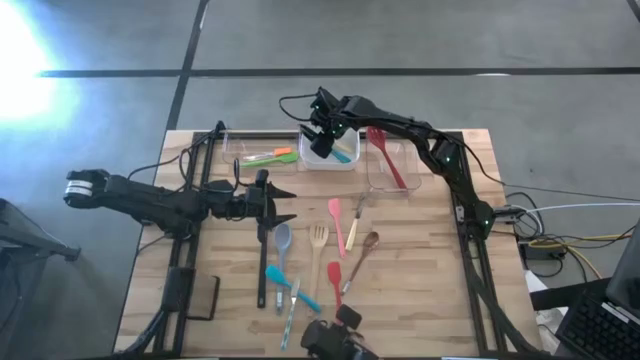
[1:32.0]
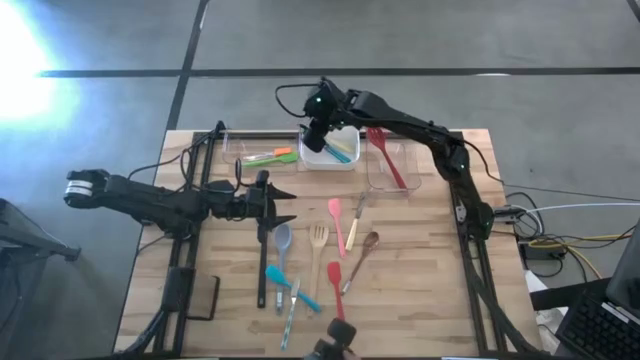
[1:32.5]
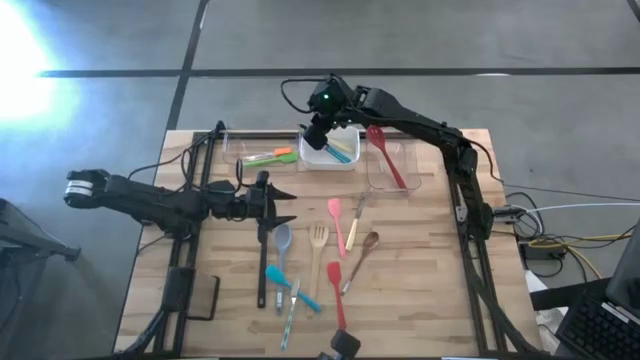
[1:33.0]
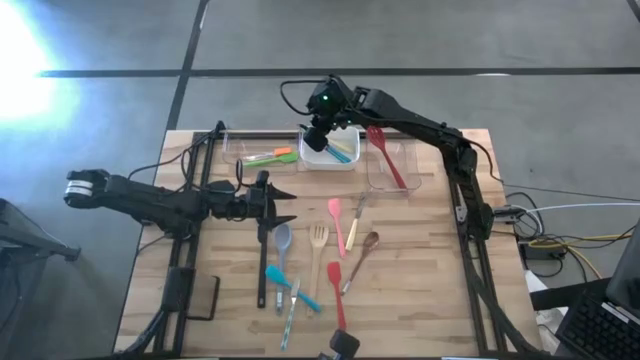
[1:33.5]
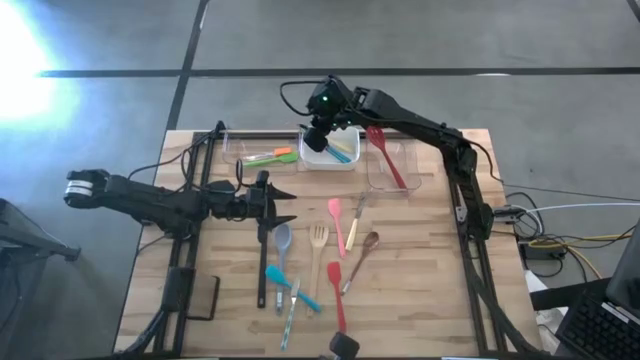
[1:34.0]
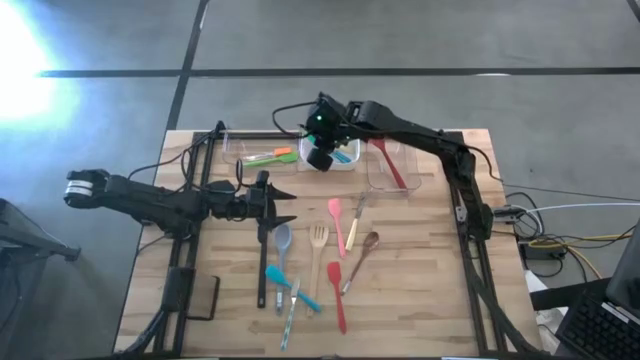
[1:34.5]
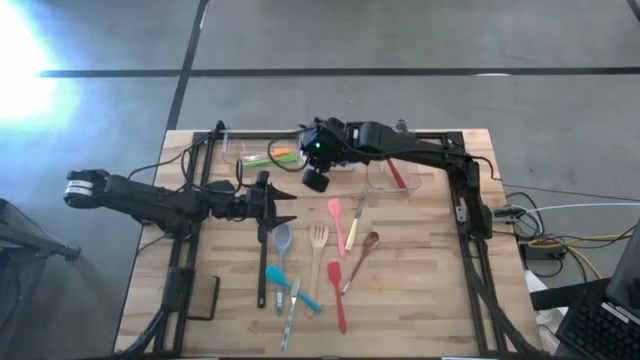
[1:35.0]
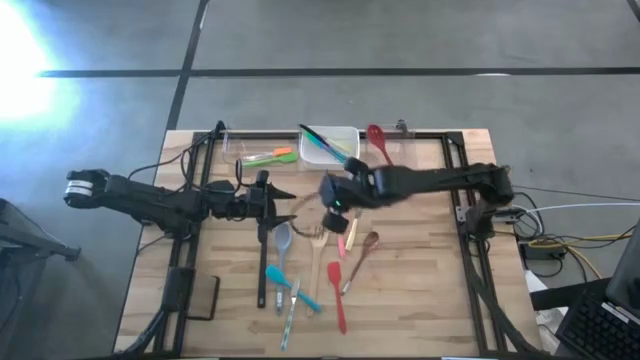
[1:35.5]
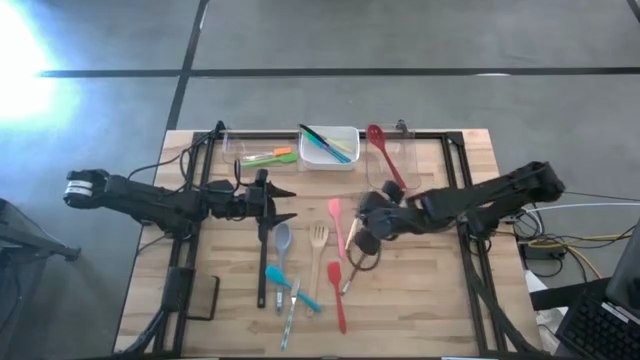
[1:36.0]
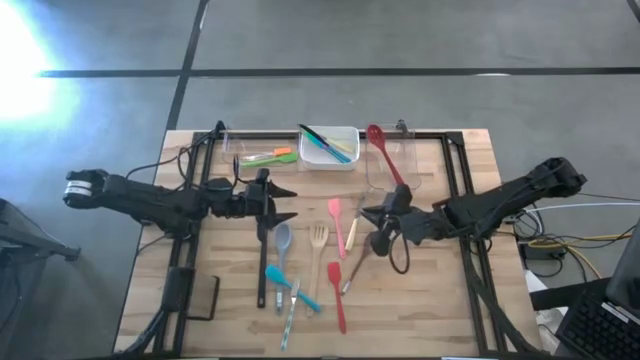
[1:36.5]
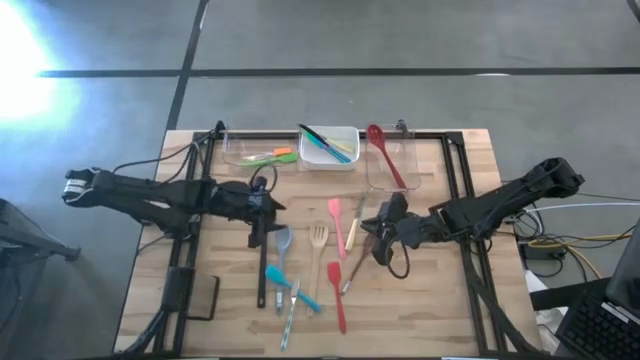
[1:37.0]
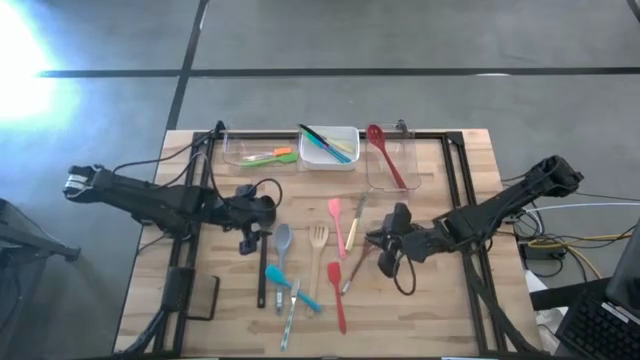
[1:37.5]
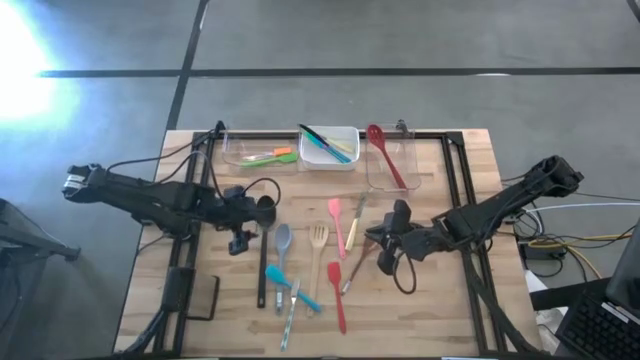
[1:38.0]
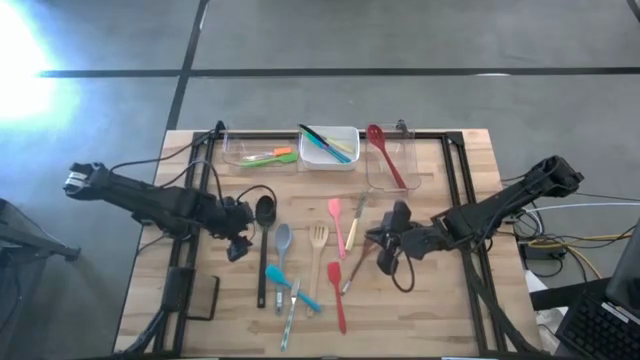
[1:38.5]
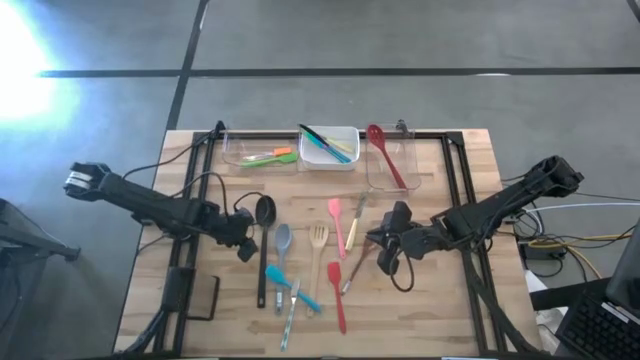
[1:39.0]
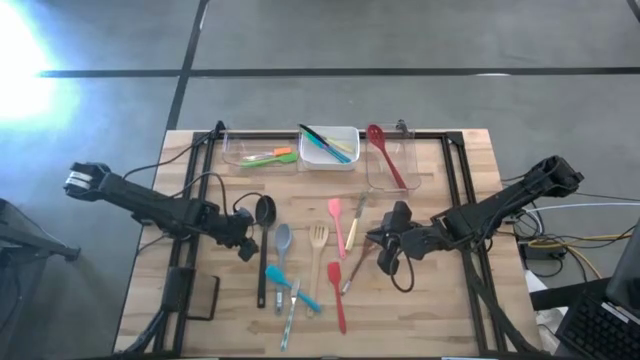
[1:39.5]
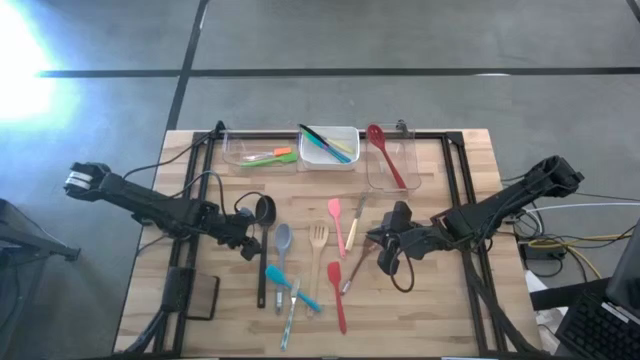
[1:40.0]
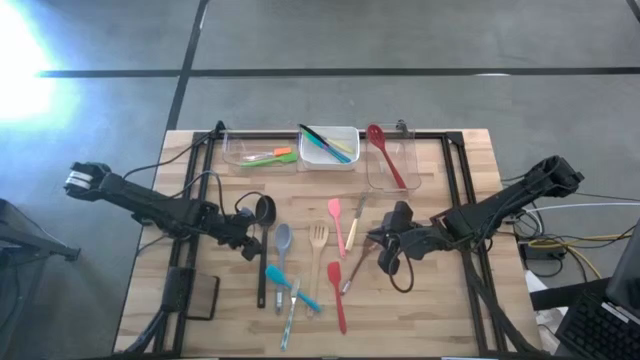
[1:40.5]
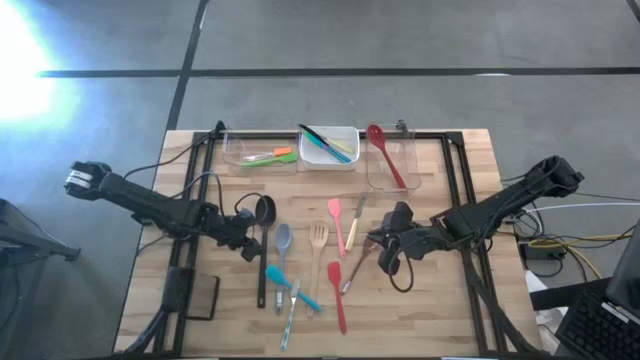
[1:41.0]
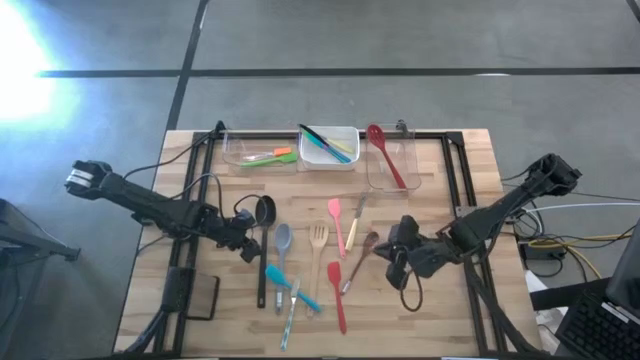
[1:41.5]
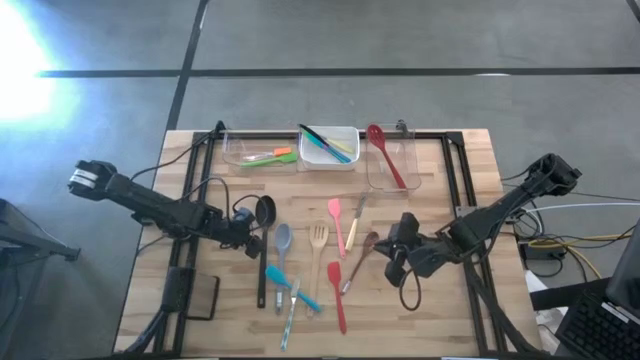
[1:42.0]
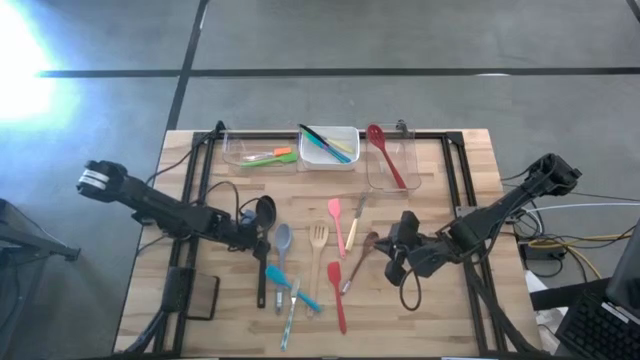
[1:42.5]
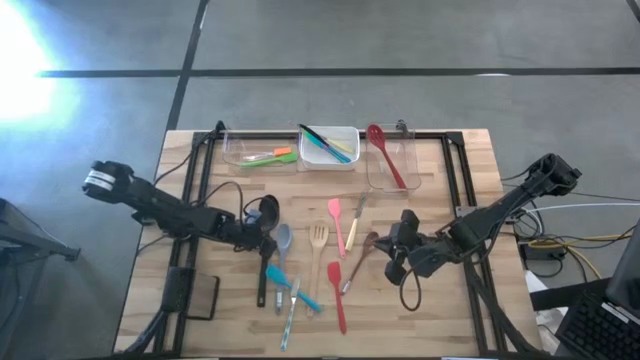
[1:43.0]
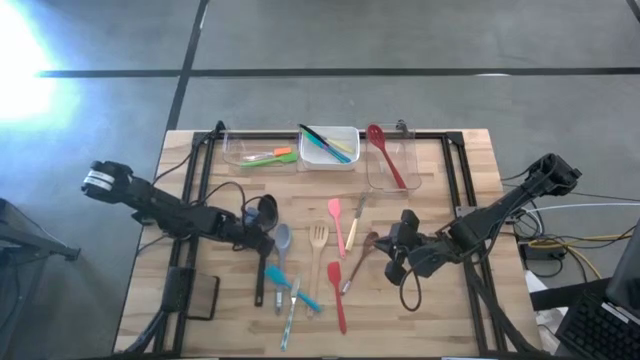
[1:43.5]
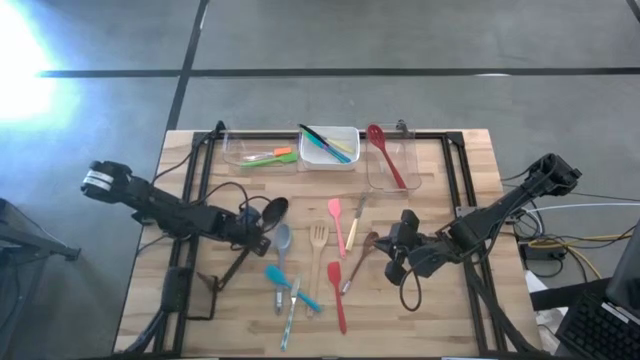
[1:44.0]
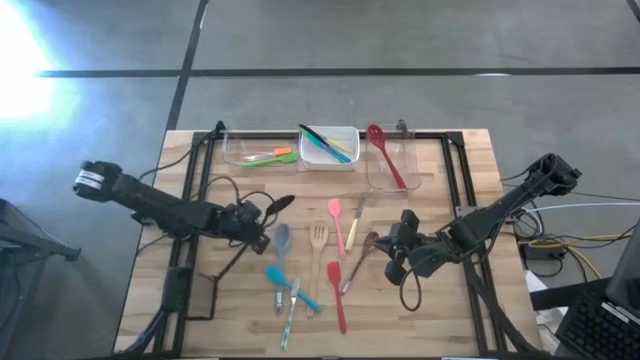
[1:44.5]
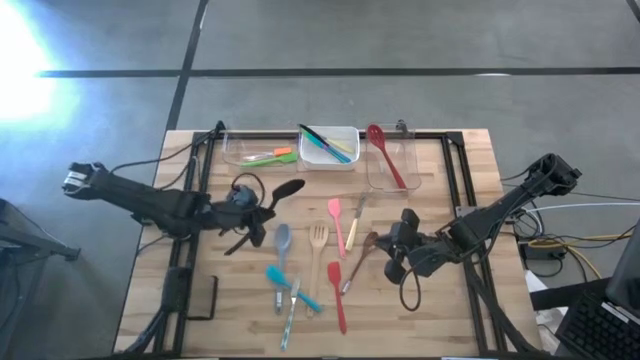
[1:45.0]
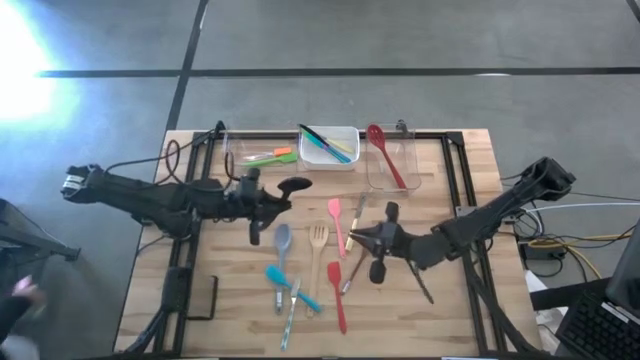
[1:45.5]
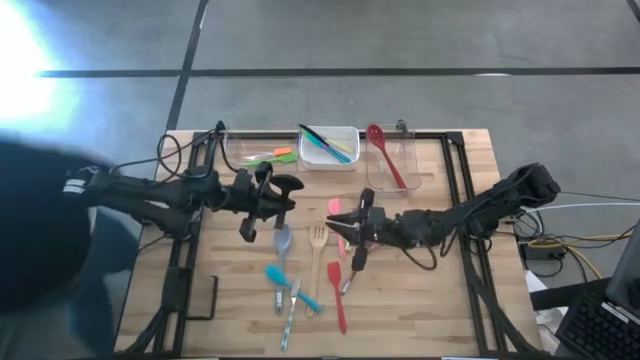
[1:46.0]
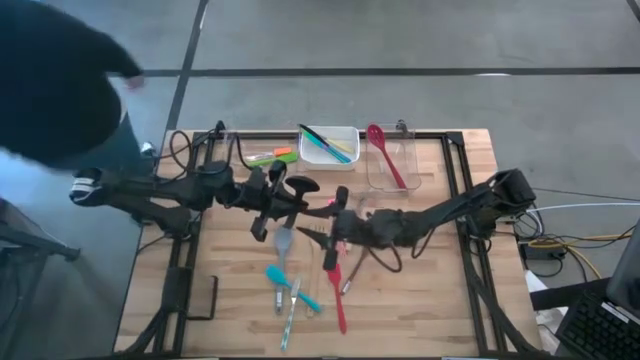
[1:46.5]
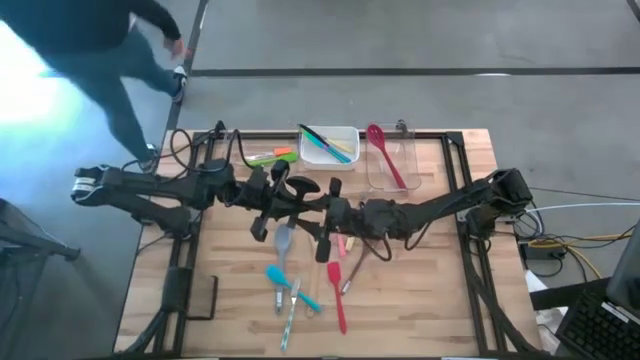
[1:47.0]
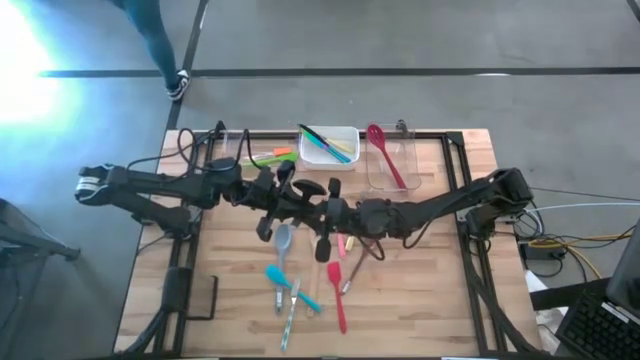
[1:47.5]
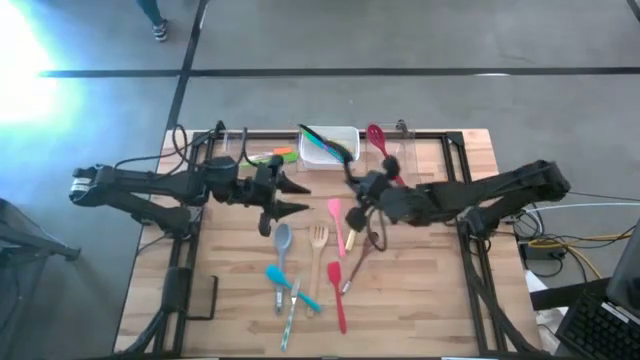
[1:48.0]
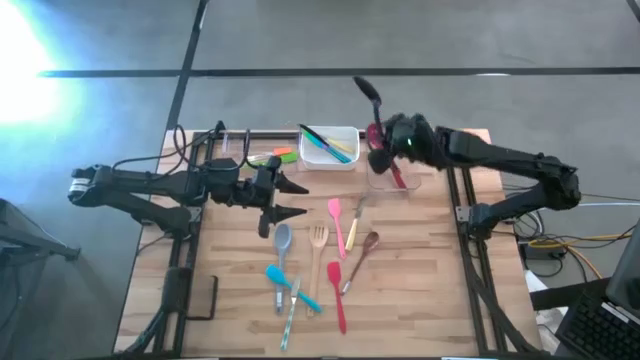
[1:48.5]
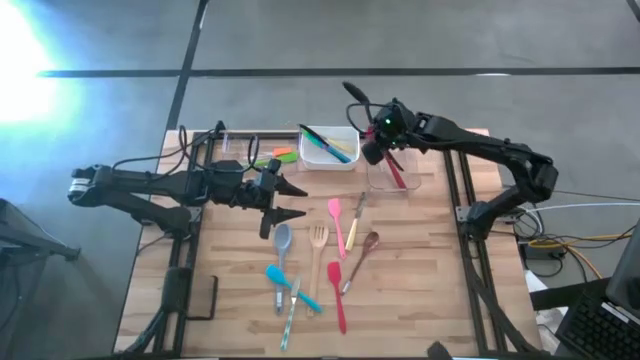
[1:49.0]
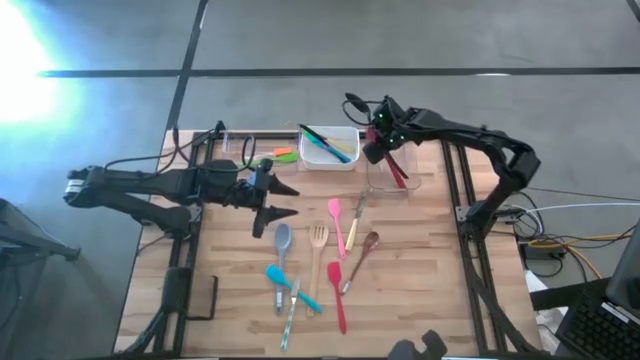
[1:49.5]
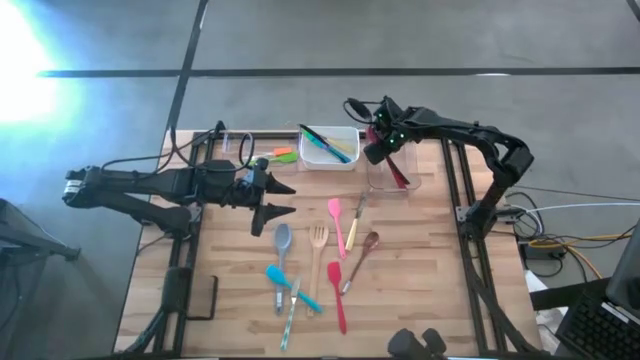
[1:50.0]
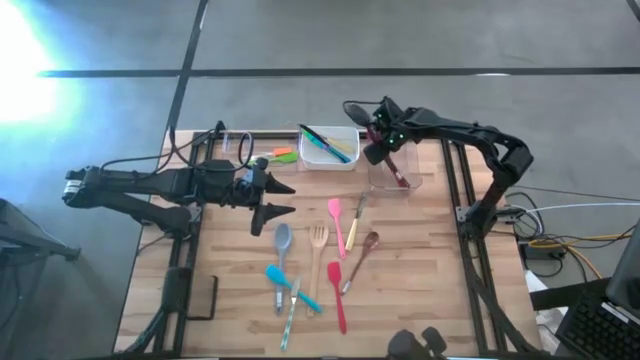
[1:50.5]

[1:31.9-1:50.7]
Task: Pick & Place Kitchen Items
Put the black ladle into the right transparent bin

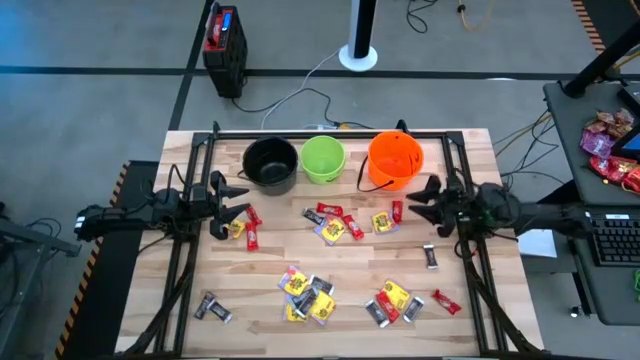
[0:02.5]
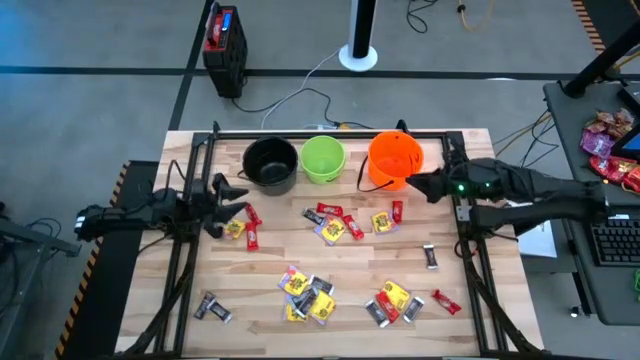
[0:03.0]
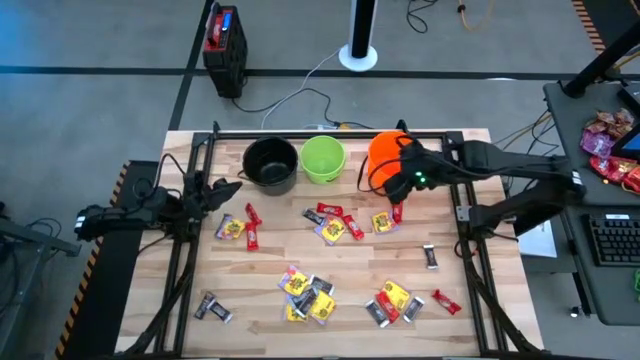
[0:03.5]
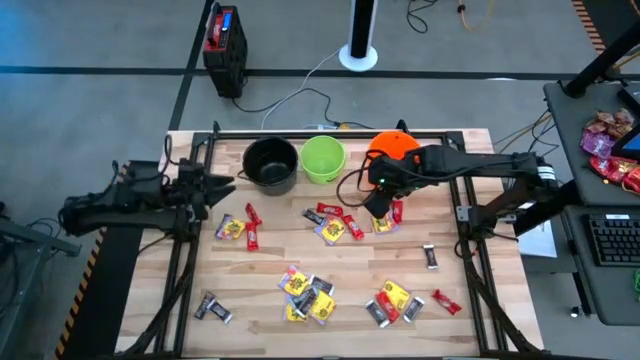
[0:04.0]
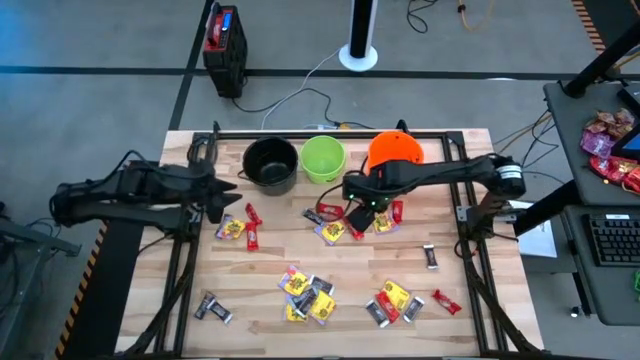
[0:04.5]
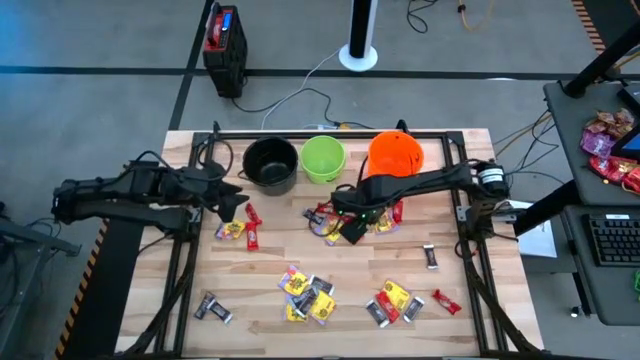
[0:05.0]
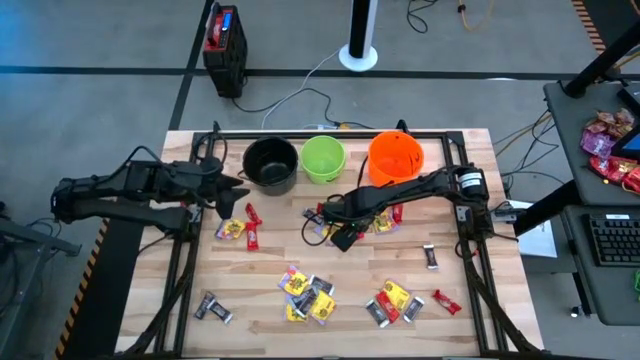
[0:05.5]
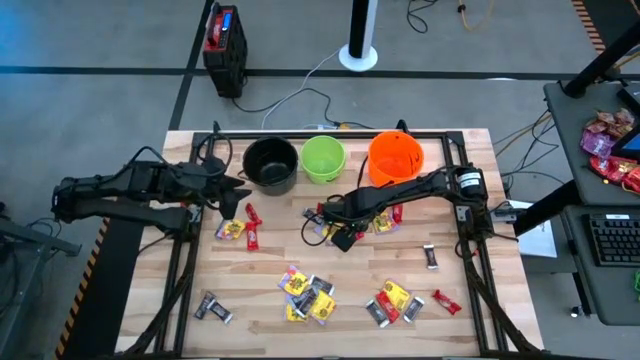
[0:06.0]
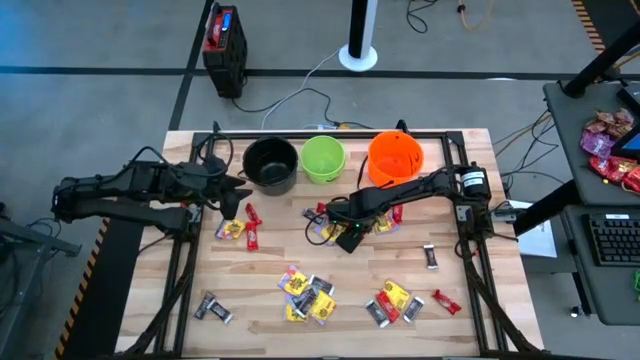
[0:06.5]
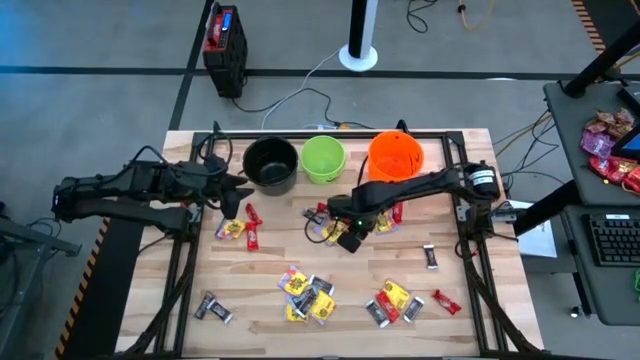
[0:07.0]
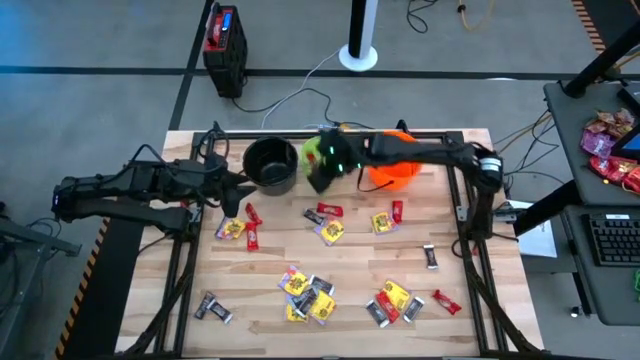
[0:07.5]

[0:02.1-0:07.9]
Task: Sort candy by brand, put in halloween buckets
Put the red chocolate bar into the green bucket
